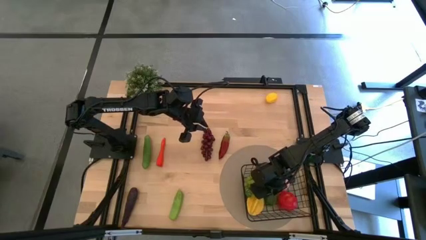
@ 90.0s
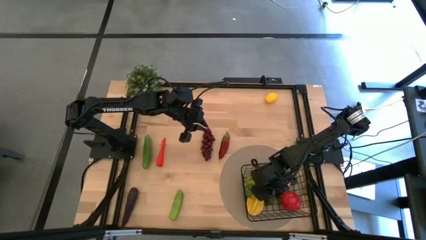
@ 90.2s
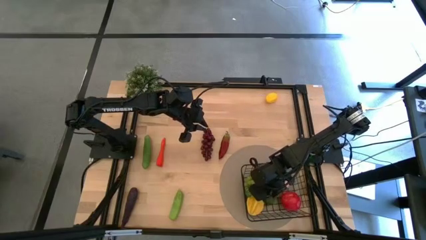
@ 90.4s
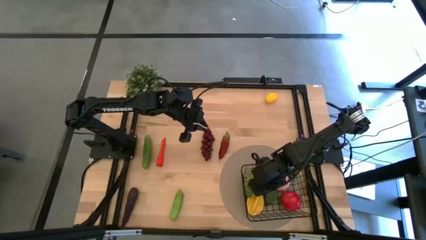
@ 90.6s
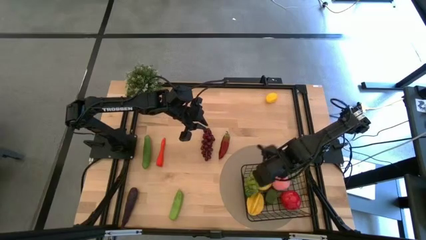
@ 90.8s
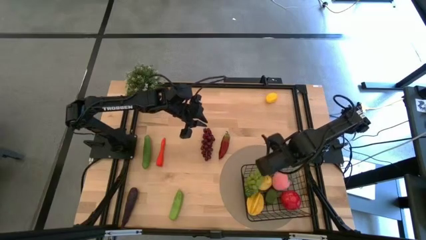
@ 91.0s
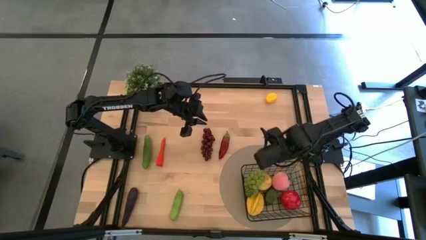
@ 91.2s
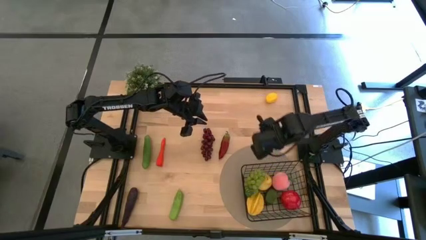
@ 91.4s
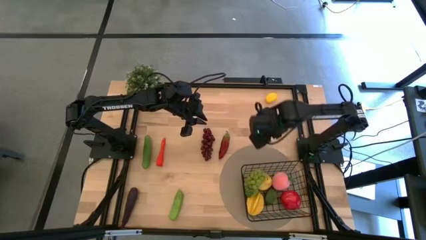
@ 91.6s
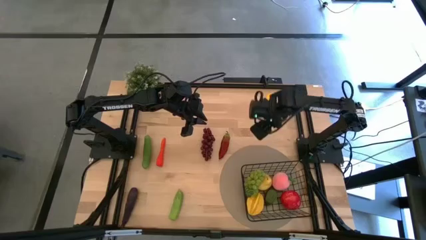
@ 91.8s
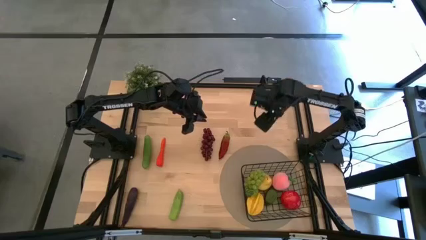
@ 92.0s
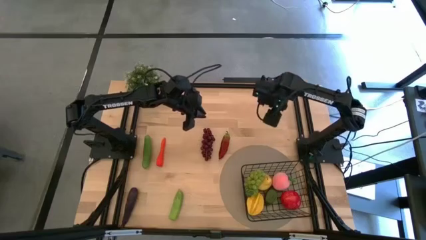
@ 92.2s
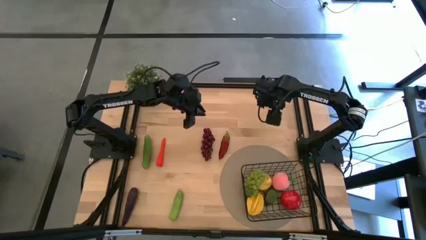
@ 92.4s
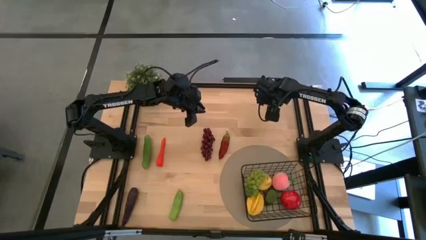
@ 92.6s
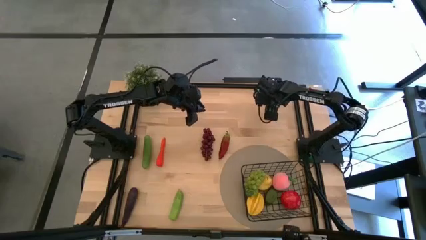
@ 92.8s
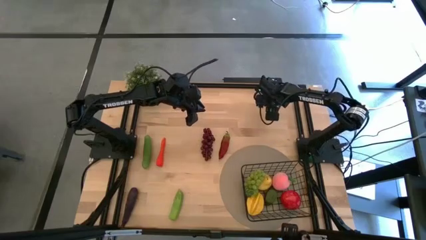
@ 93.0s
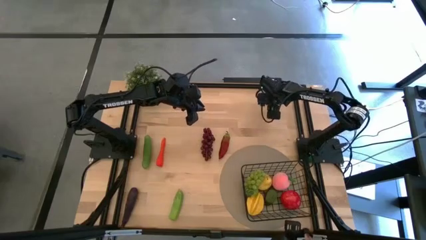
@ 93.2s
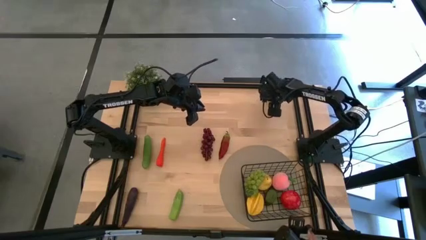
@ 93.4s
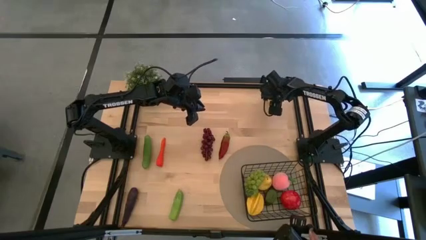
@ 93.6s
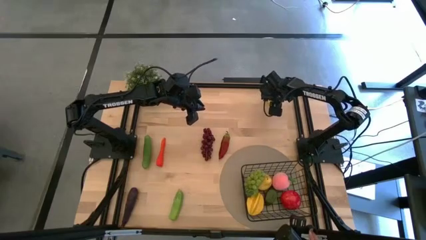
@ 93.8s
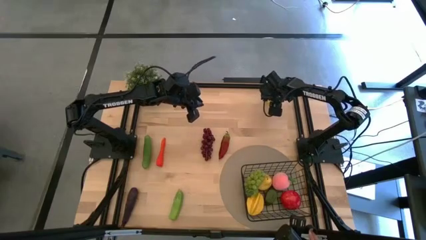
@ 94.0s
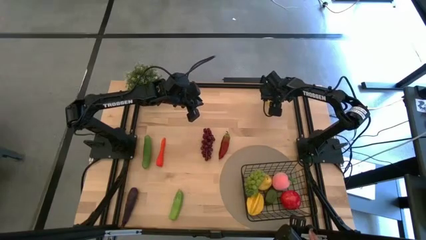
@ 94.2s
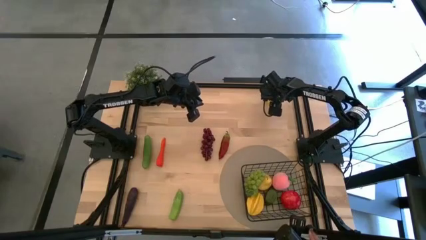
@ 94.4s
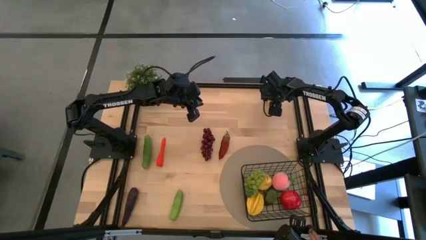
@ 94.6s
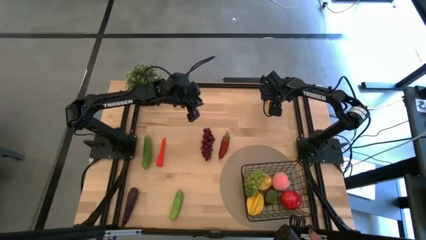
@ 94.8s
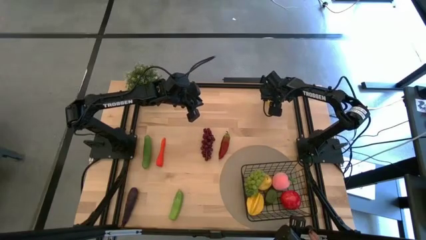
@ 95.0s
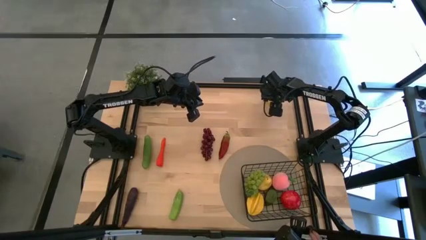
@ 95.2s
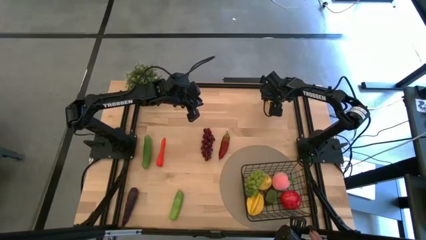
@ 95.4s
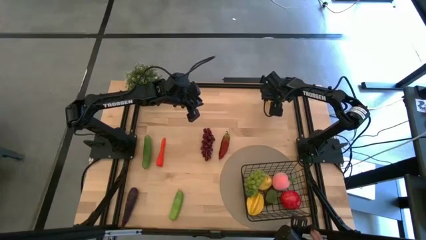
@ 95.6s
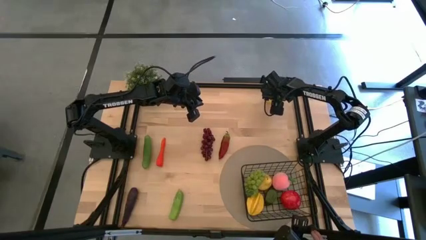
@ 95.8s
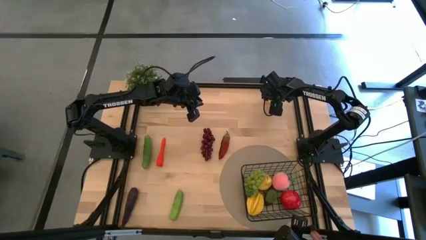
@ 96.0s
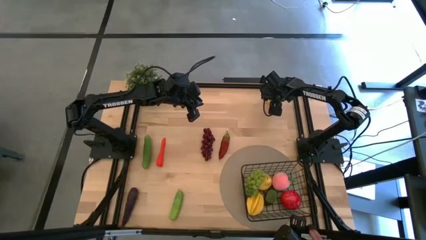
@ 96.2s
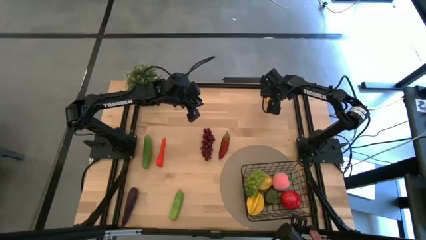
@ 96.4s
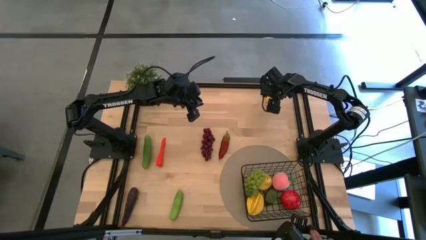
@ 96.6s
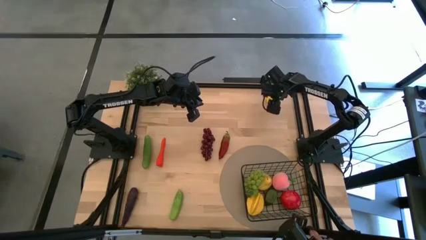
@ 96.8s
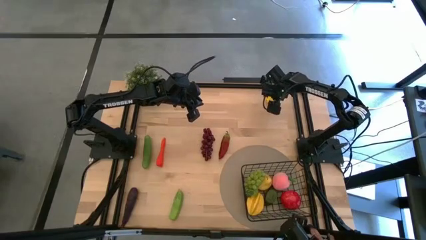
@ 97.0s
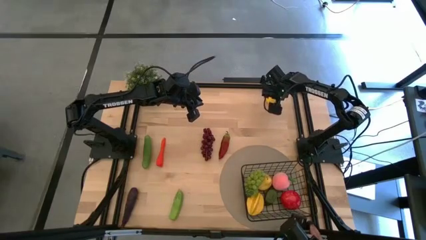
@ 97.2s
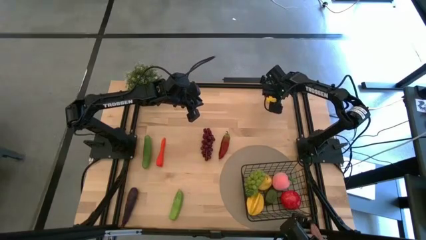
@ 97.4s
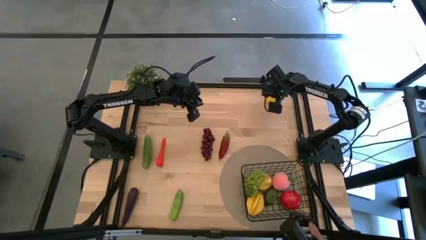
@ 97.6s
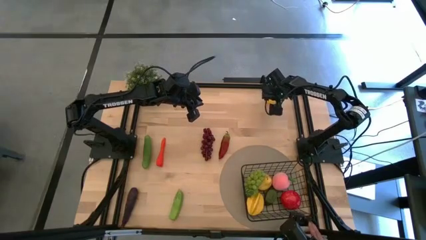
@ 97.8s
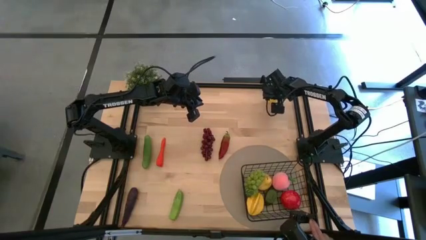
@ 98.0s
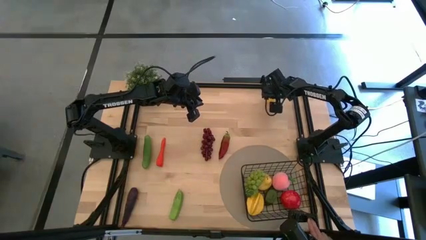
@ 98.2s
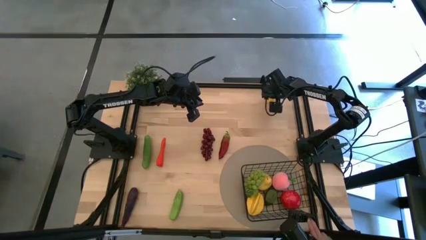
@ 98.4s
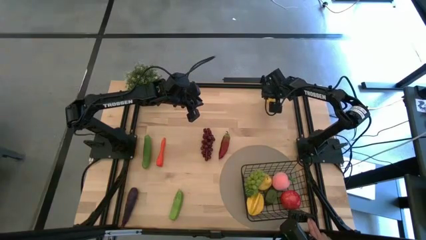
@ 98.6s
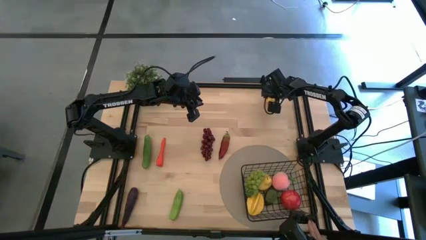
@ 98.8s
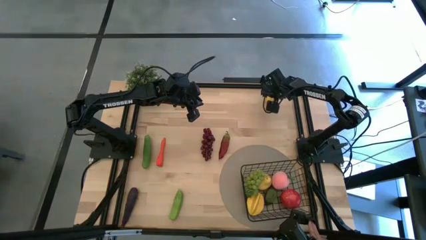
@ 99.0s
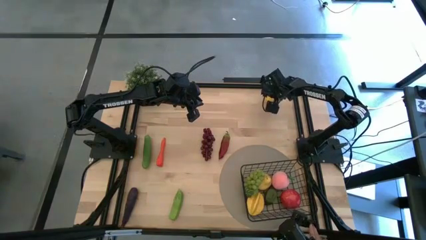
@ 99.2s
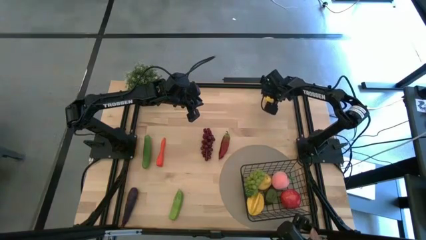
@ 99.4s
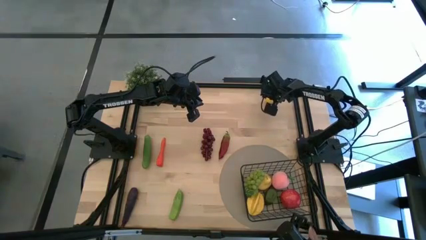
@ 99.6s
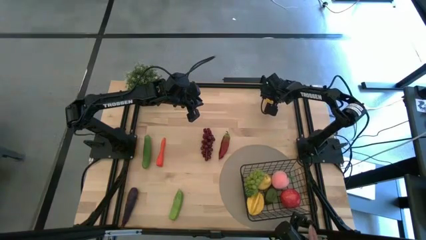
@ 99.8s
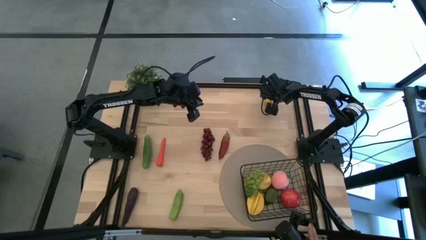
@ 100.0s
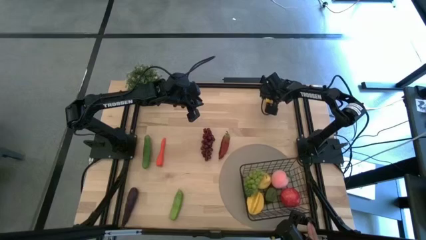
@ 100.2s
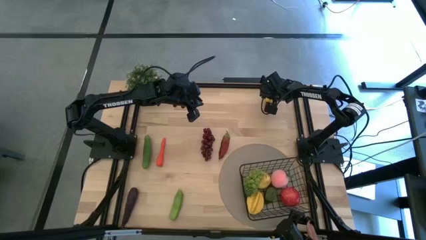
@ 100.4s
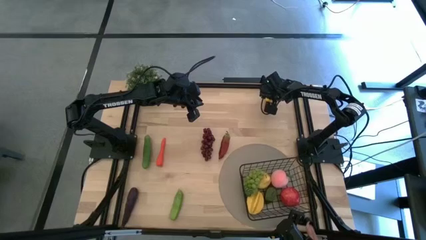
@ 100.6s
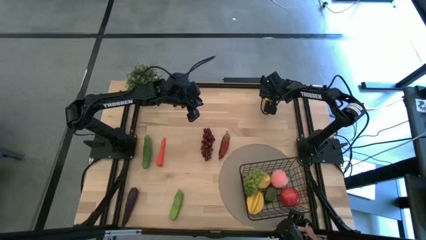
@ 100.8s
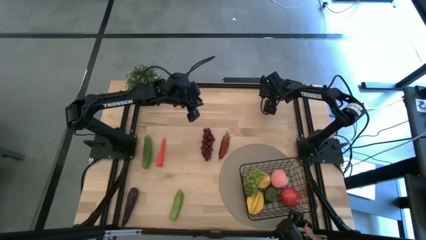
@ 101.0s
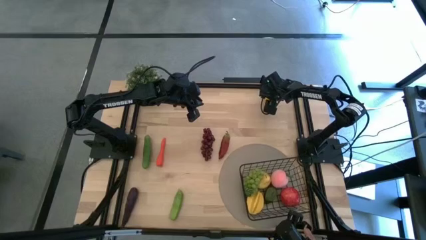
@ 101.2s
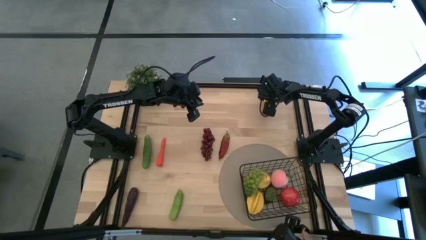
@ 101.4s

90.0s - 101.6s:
Task: Build produce basket
Put the lemon into the wire basket

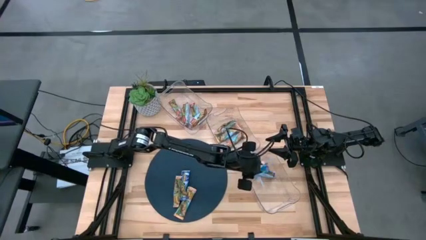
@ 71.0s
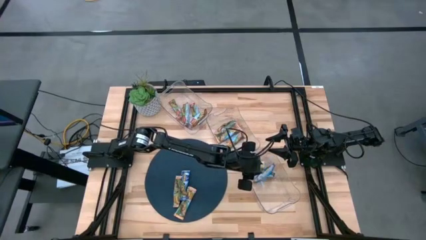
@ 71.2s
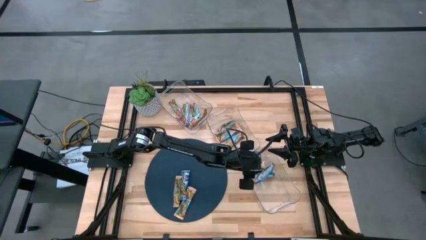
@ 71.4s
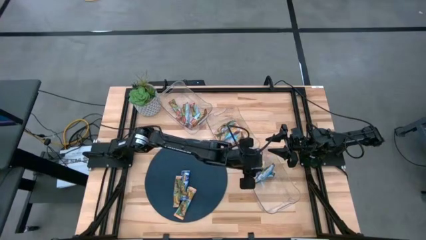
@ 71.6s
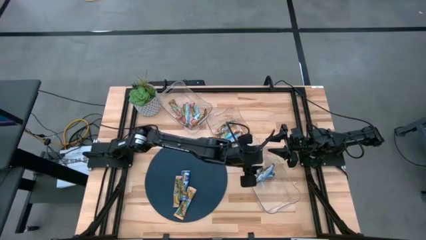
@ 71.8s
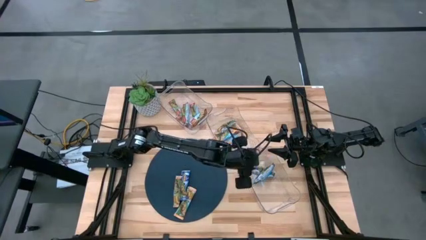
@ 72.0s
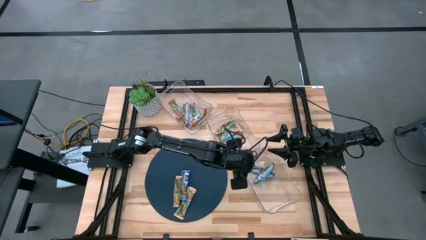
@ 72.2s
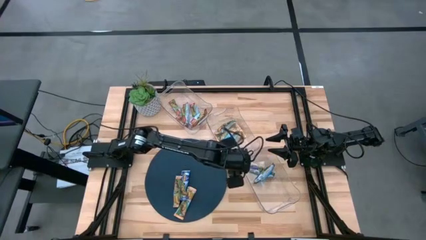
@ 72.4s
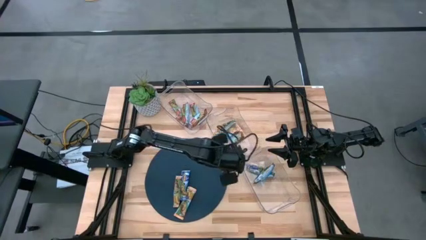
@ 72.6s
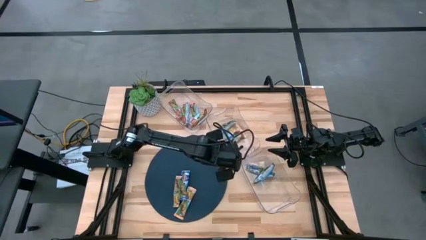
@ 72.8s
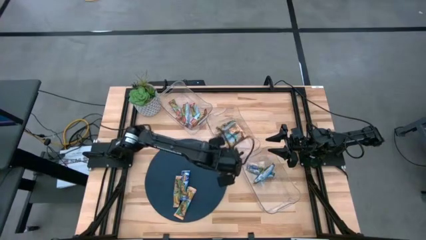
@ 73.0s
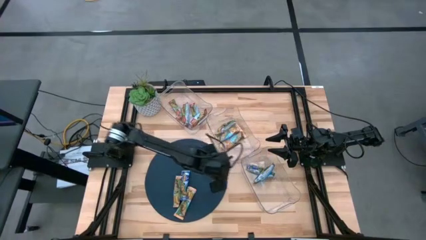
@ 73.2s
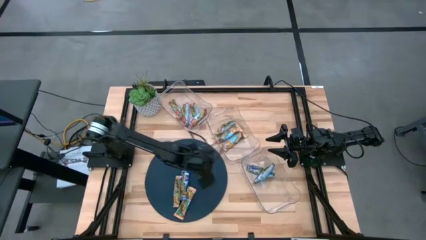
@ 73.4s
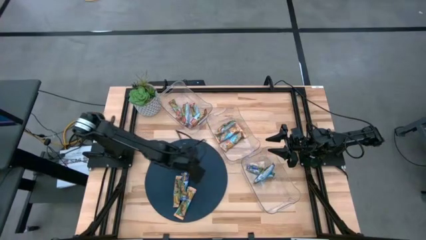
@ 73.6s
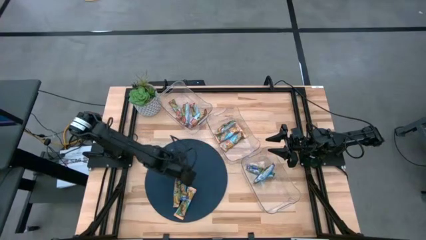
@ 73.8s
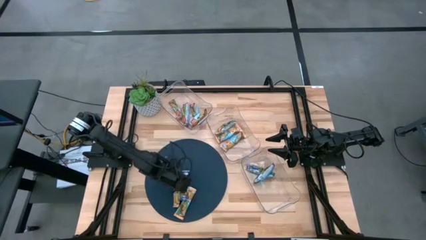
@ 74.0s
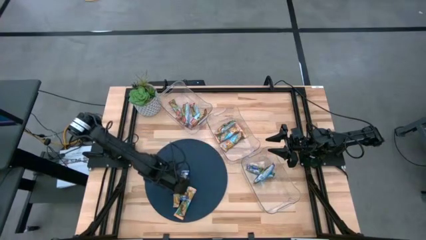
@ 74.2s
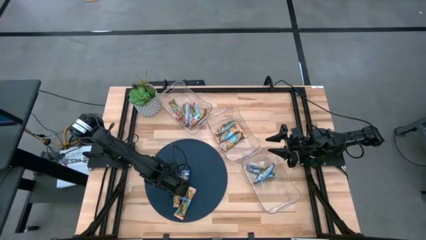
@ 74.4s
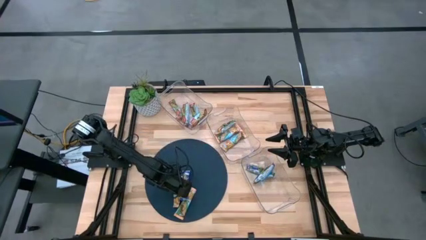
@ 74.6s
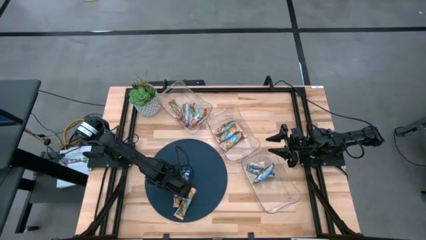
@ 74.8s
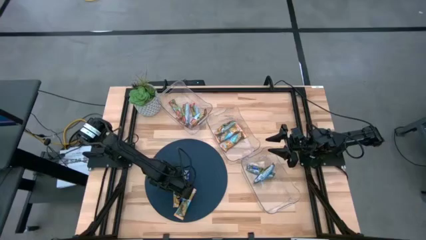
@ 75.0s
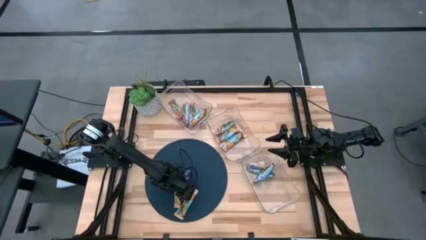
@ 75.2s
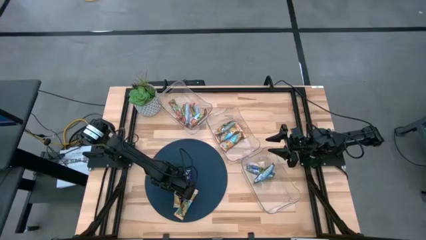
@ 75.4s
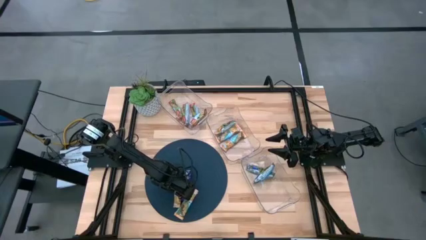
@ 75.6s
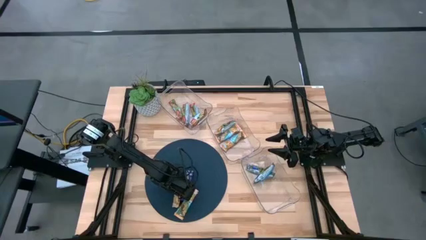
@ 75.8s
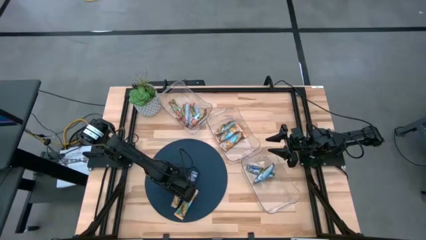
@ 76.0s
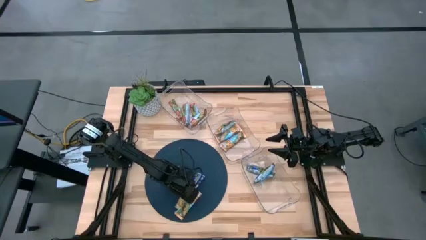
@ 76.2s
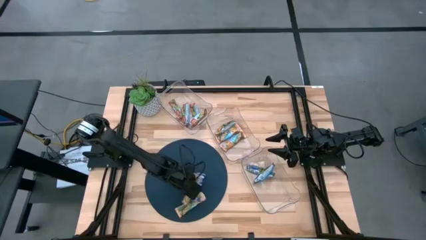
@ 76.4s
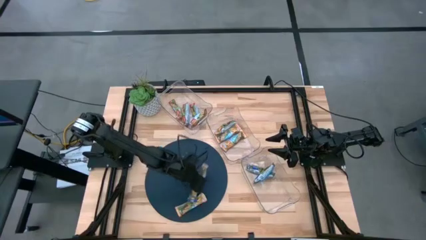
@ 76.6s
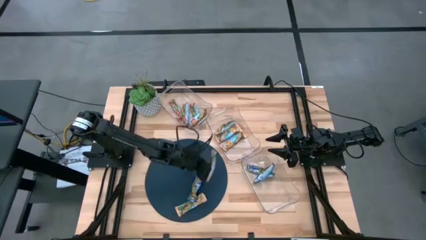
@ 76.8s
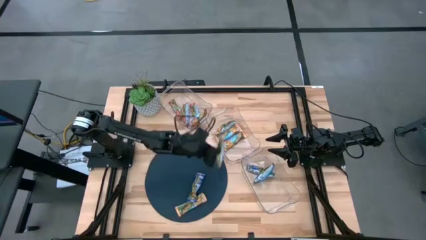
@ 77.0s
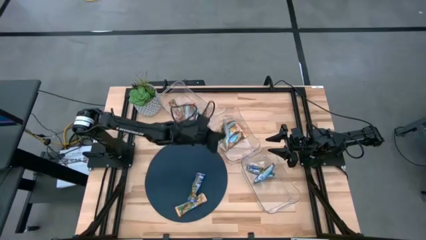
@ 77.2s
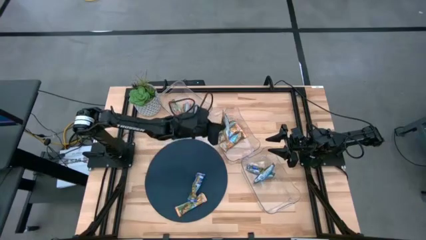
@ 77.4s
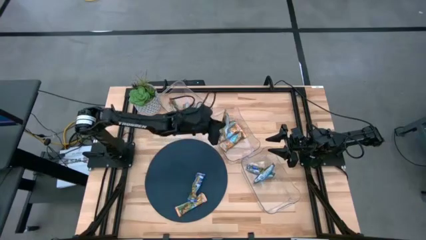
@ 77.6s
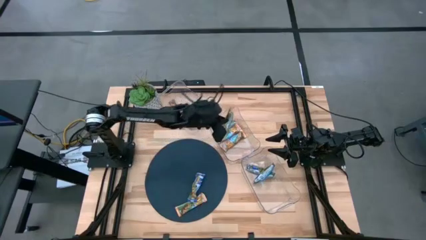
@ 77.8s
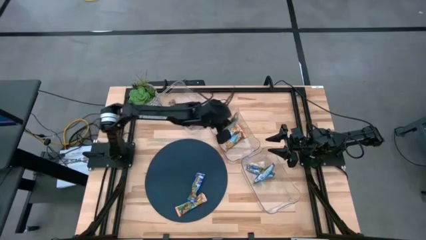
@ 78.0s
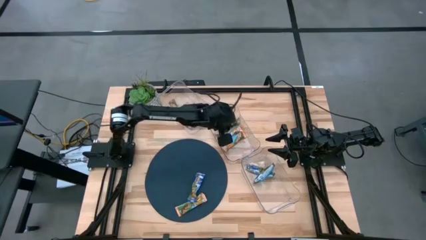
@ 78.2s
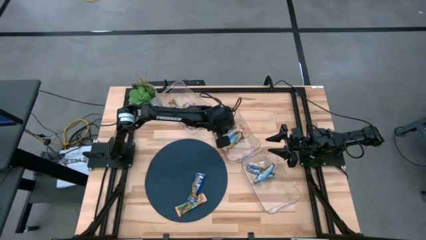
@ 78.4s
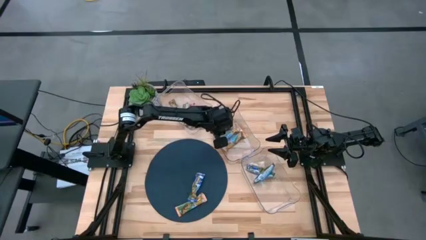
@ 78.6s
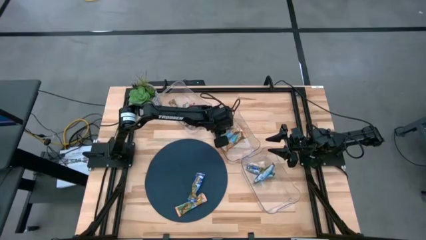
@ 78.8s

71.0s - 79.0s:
Task: Pick and place Granola Bars by type
Put the yellow granola bar into the middle transparent bin
